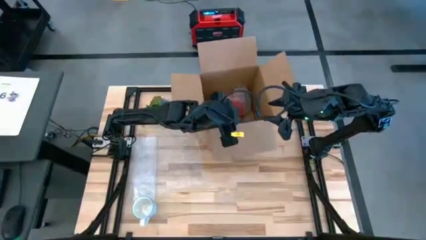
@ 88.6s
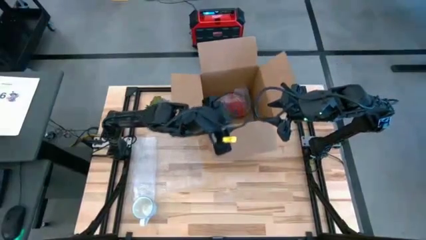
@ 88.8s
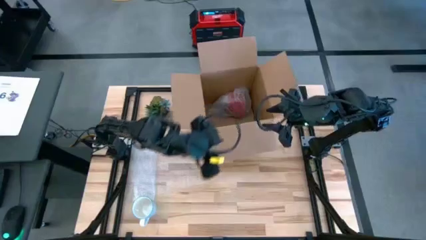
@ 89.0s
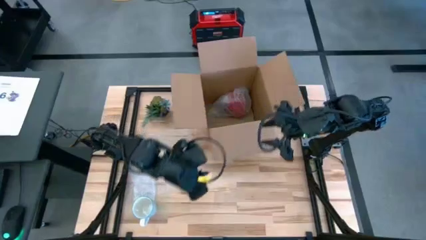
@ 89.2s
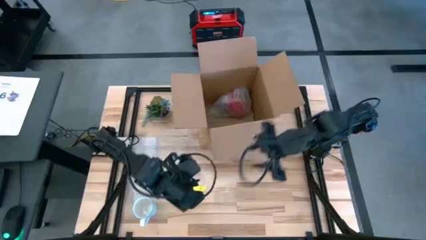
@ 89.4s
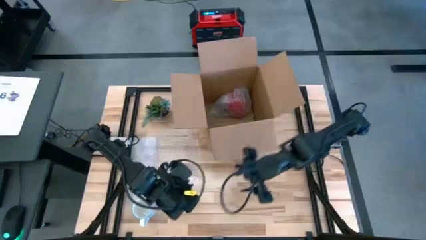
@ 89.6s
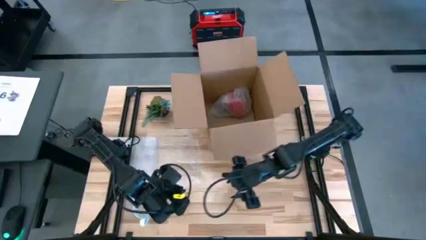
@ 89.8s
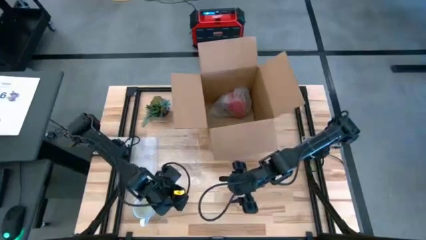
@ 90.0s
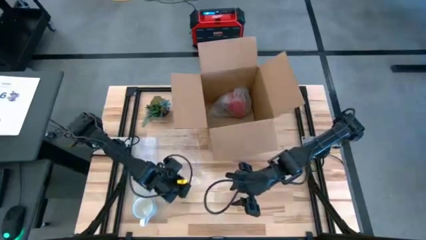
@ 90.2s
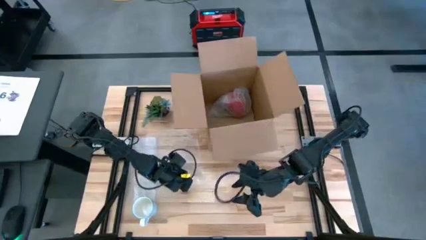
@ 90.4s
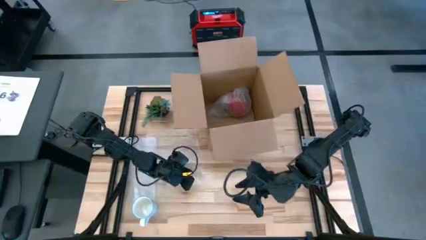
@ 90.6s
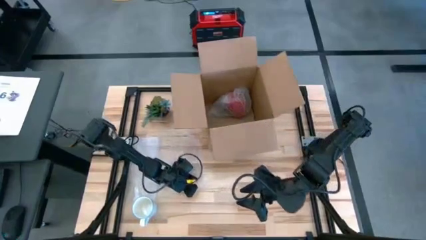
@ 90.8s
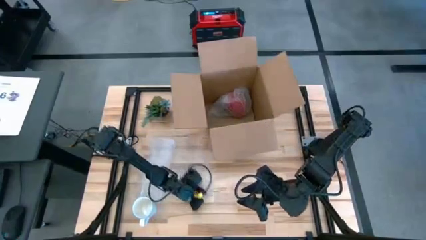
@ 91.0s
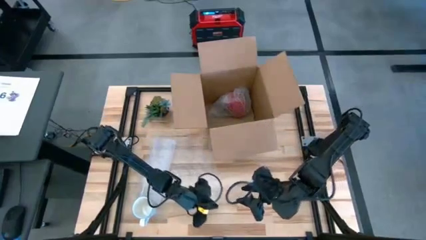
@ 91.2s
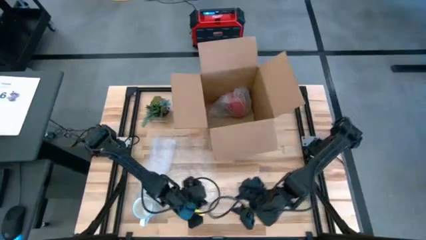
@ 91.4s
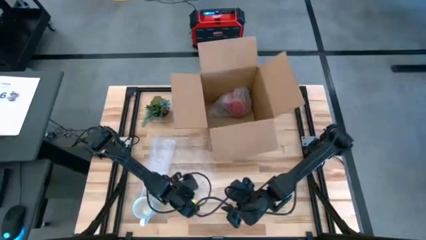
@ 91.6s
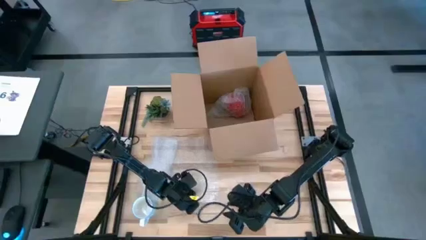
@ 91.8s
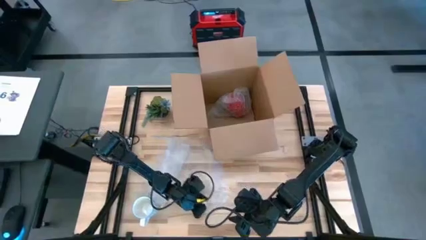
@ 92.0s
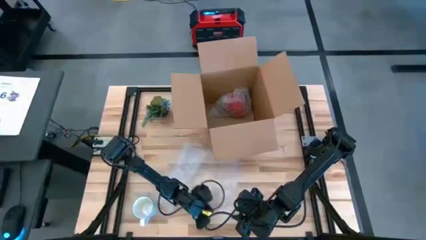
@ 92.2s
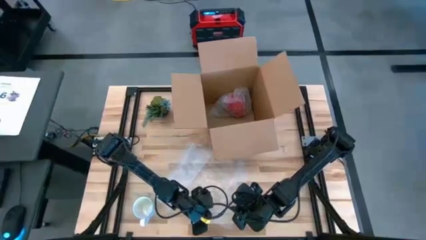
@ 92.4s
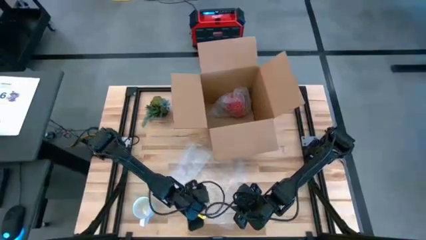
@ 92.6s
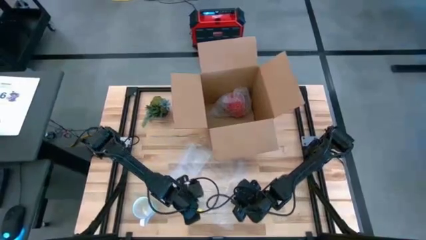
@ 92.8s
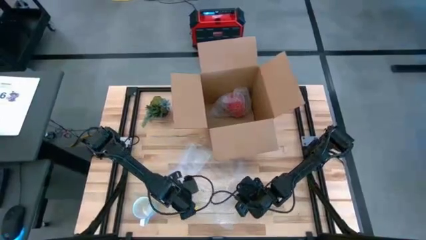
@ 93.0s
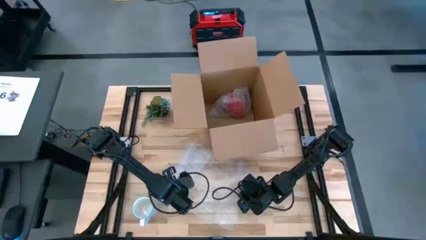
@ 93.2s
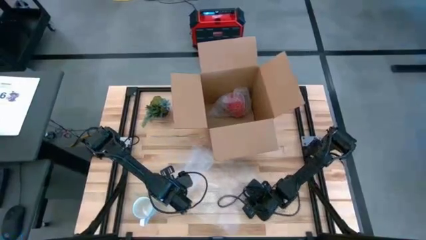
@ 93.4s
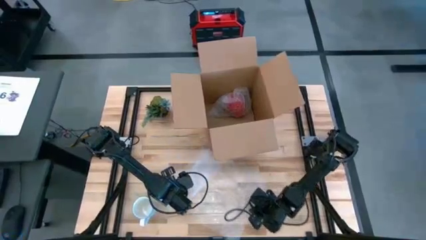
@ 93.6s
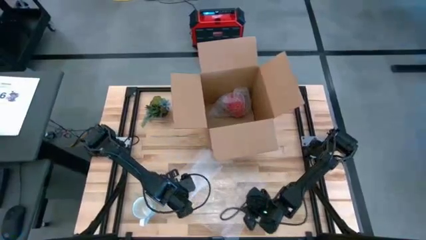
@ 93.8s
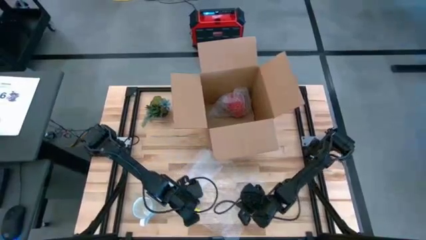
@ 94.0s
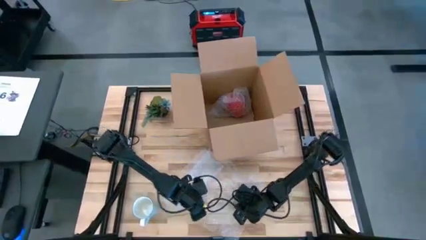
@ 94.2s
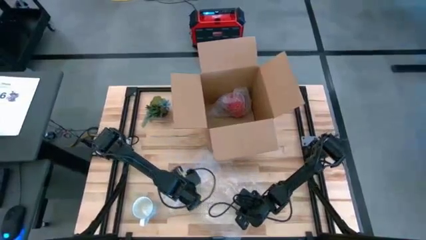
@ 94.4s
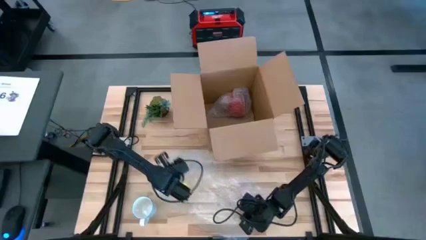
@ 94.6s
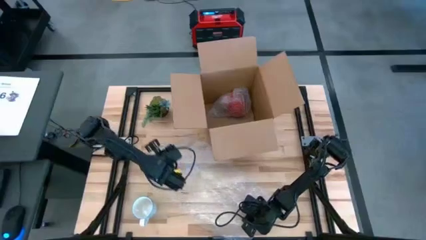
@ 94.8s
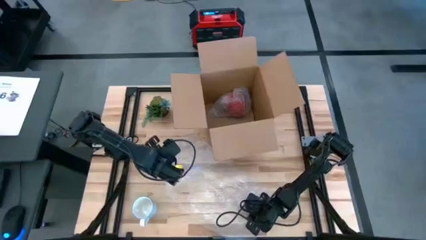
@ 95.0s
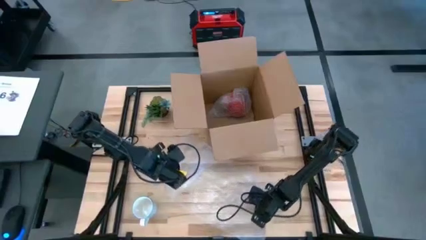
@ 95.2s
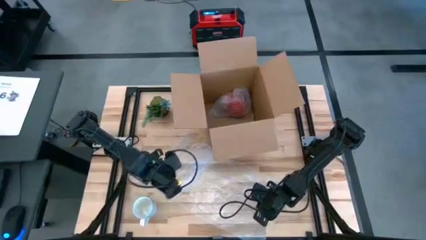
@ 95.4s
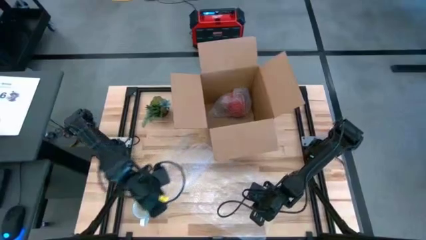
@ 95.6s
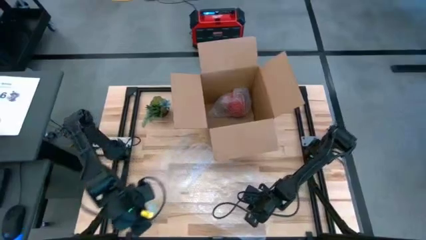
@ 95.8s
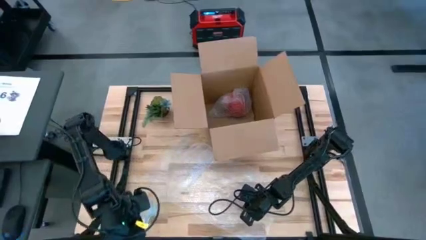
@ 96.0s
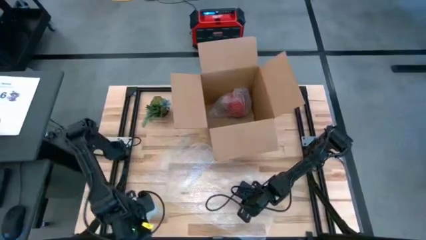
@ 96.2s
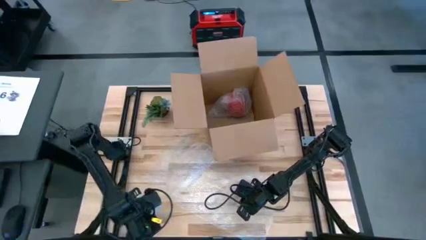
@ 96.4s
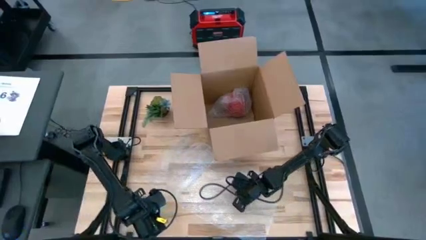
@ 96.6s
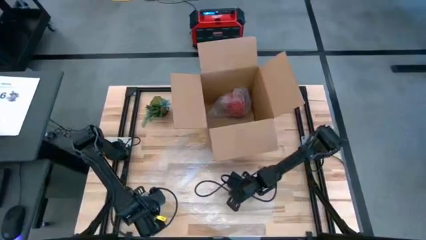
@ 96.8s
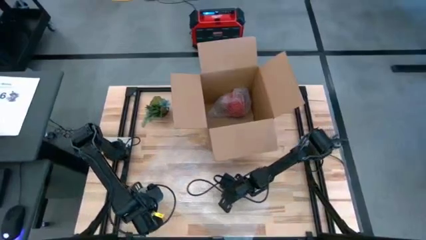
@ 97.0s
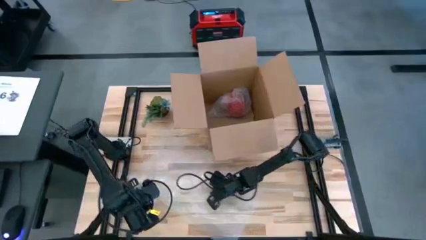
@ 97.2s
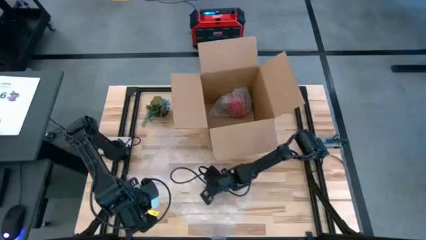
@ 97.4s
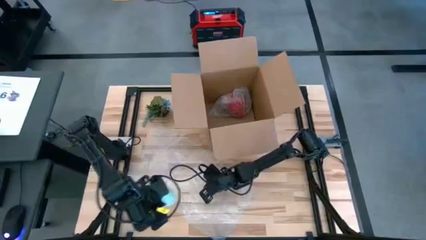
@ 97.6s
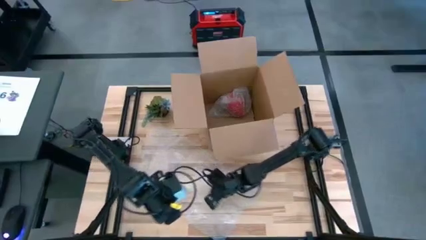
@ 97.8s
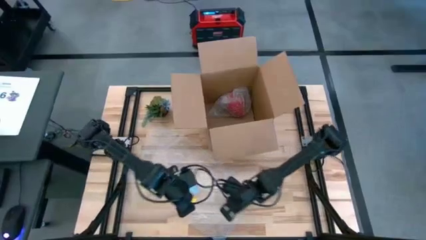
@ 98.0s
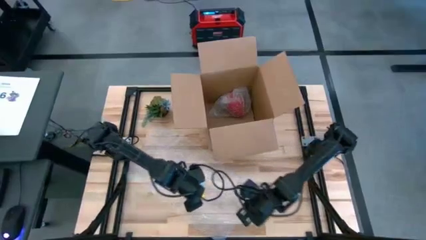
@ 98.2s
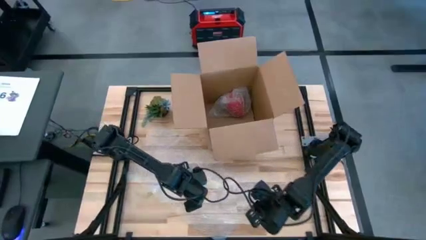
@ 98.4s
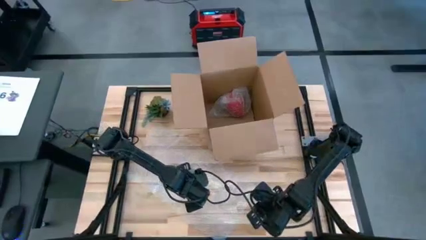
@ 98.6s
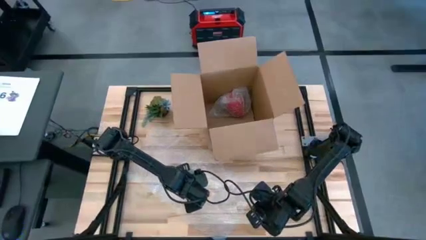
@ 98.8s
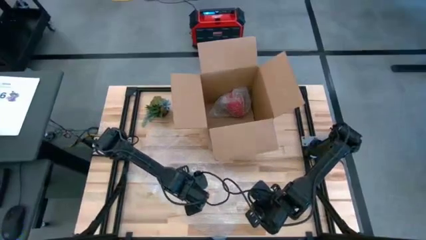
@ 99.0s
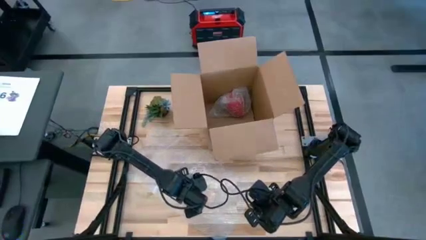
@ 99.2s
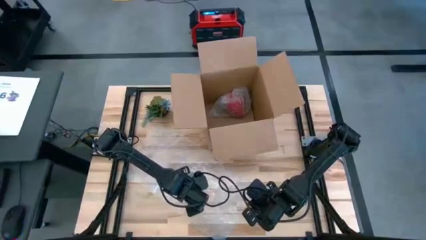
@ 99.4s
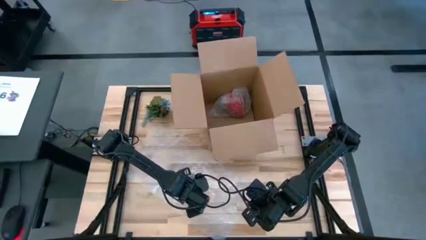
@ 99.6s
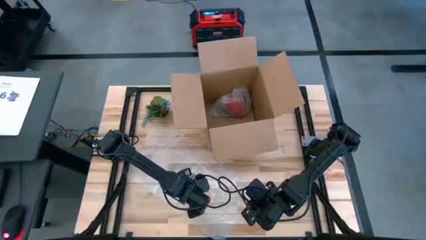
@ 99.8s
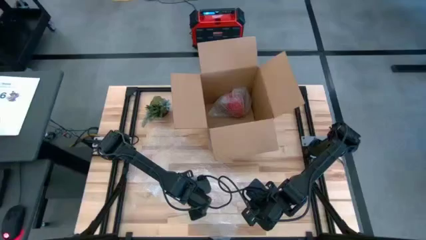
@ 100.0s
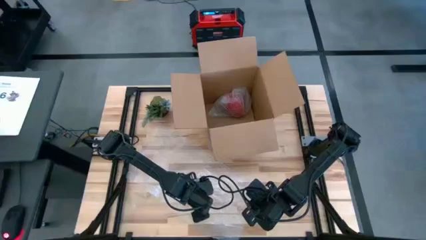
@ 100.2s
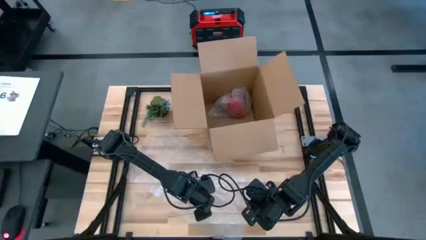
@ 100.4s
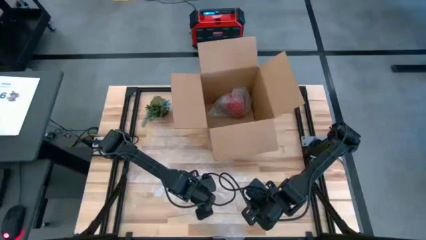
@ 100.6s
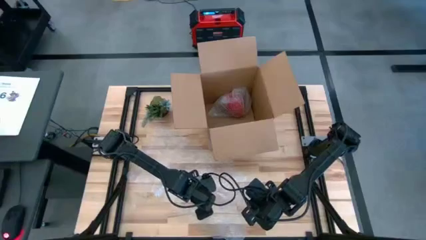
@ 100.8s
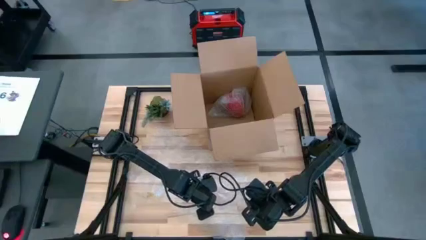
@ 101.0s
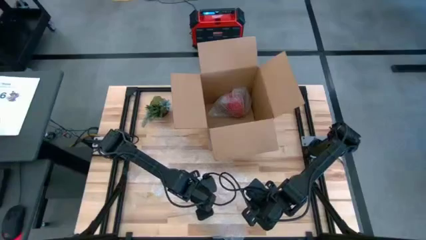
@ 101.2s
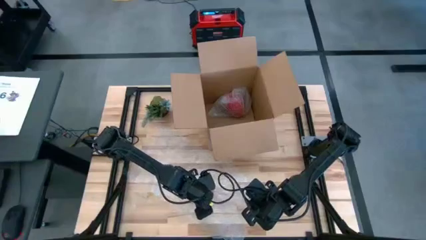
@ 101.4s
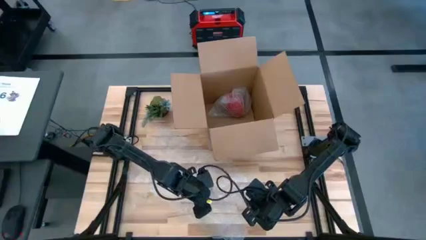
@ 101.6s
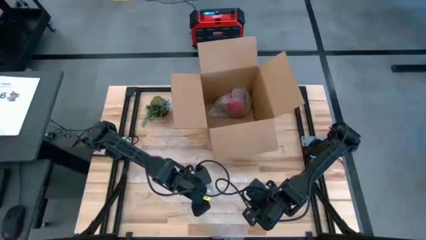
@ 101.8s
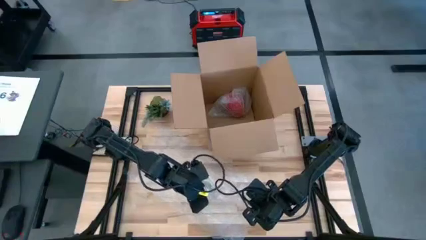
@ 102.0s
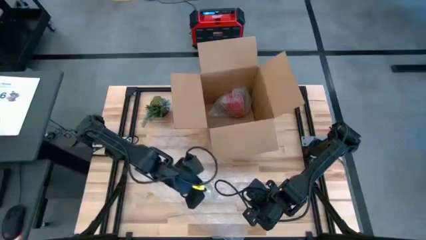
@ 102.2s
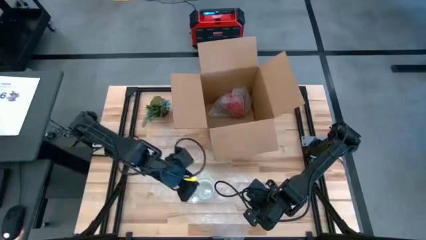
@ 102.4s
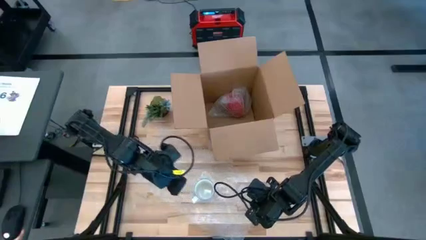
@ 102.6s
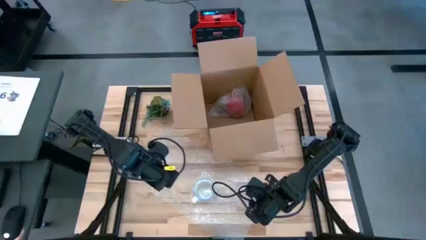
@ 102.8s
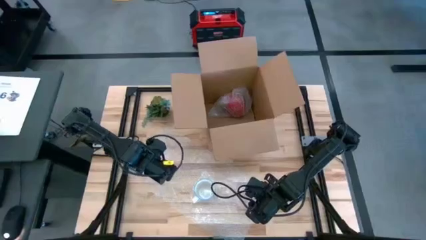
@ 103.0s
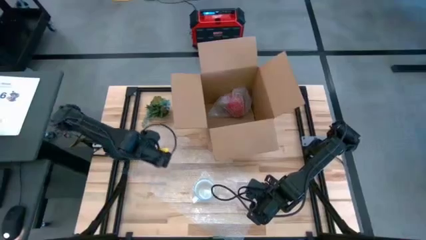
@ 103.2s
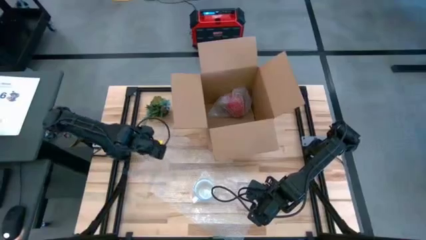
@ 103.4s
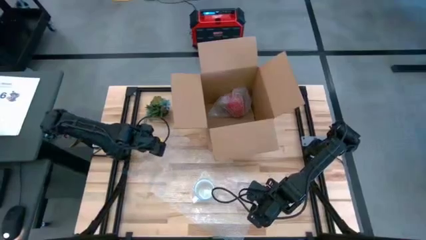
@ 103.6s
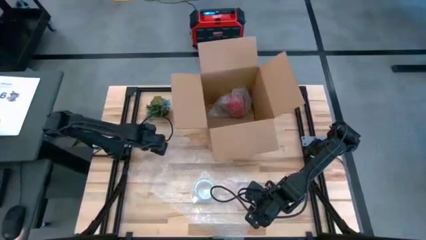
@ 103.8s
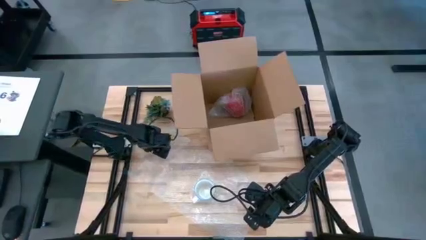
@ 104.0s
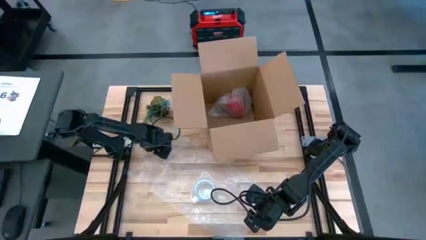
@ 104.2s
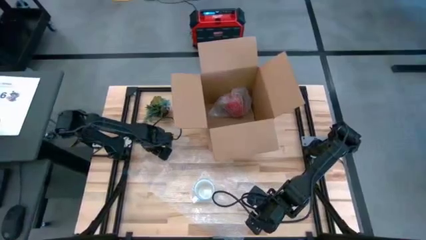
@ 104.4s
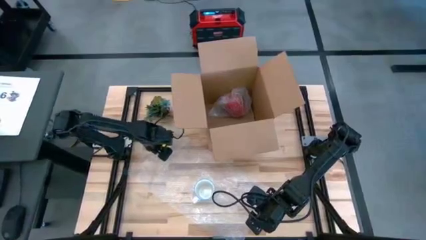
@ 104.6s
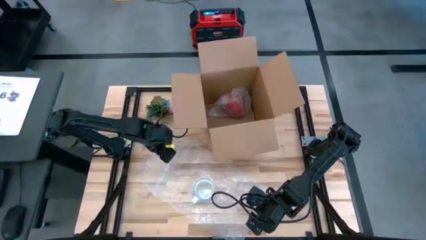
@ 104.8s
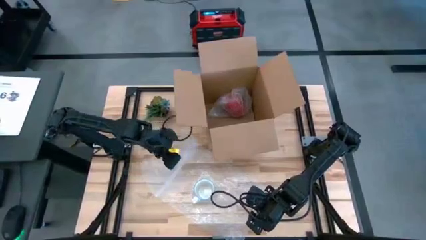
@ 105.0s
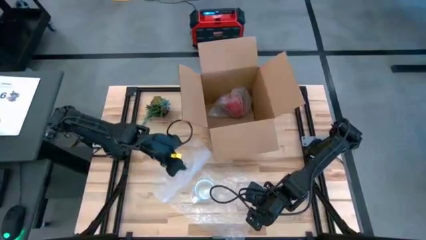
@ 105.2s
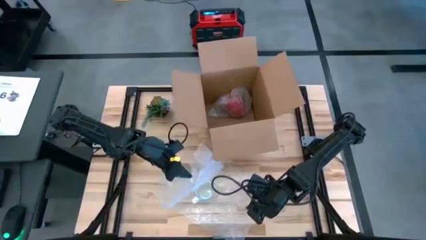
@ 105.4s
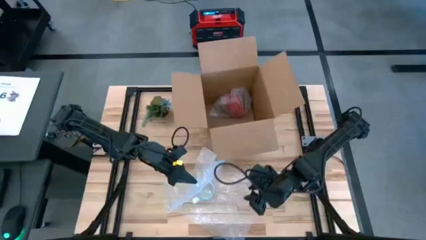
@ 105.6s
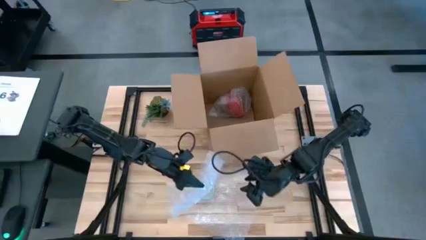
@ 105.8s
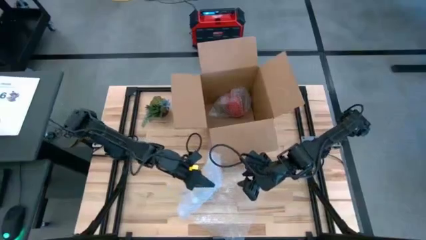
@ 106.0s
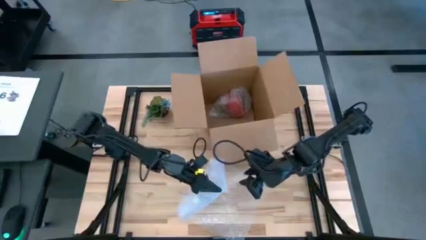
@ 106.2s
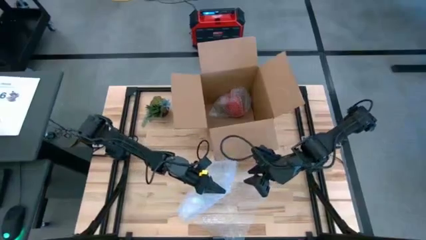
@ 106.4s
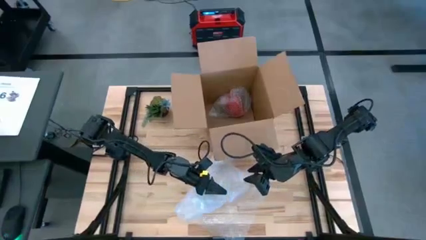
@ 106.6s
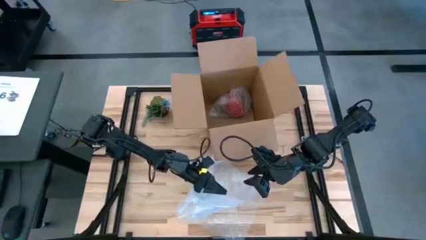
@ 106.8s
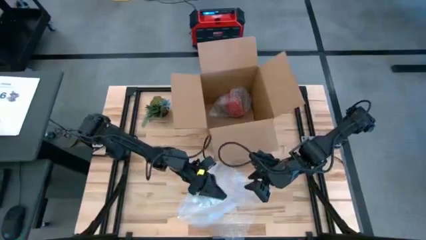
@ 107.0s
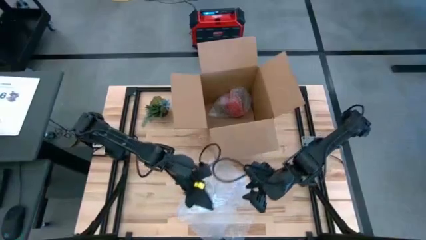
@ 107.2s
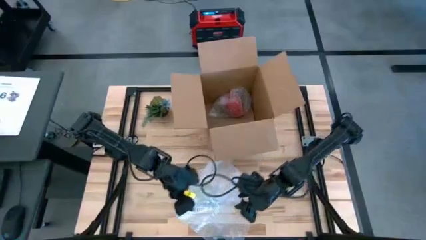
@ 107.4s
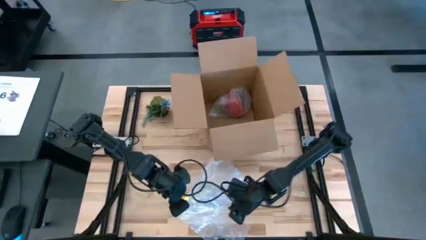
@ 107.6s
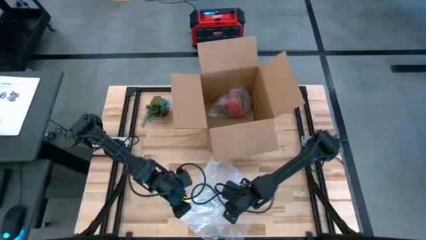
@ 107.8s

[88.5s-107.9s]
Task: wrap mug
Wrap the white mug with bubble wrap
